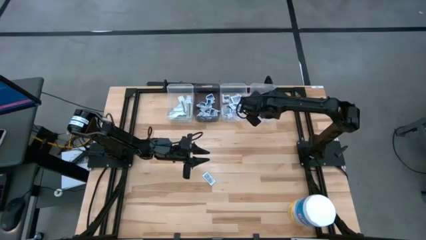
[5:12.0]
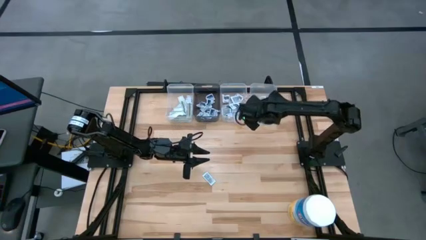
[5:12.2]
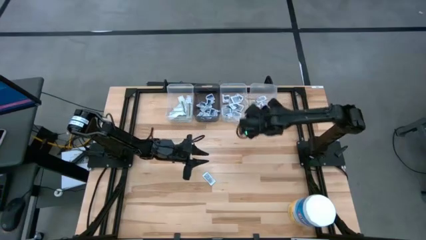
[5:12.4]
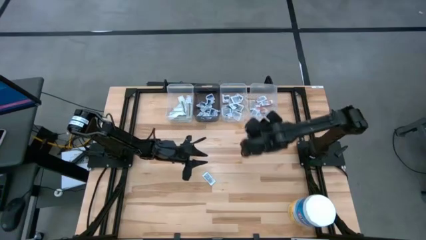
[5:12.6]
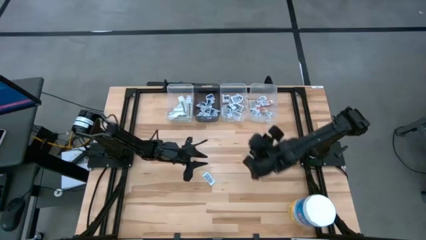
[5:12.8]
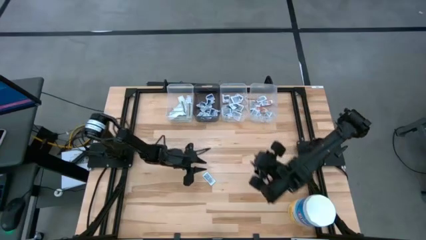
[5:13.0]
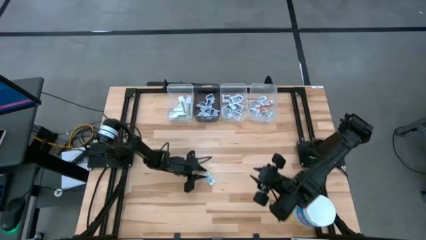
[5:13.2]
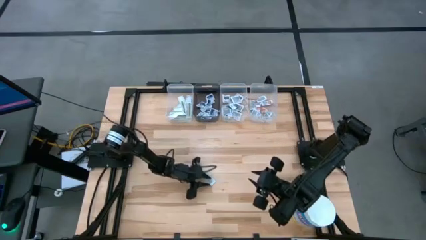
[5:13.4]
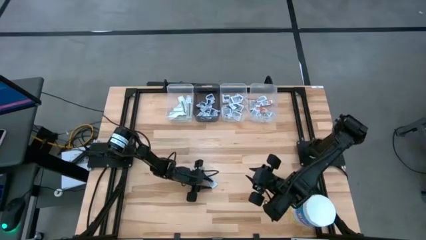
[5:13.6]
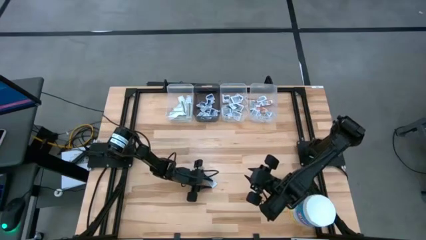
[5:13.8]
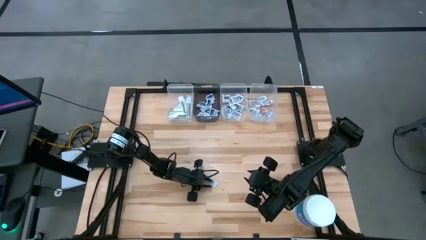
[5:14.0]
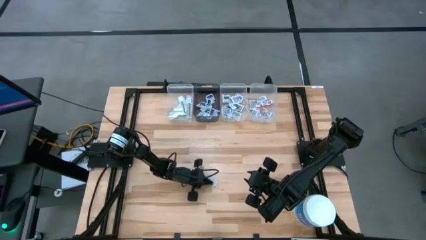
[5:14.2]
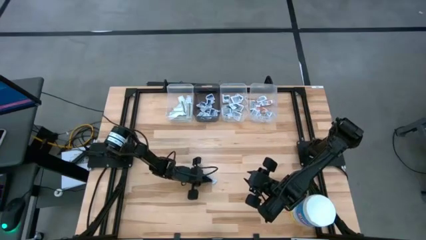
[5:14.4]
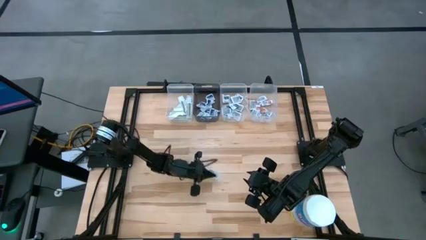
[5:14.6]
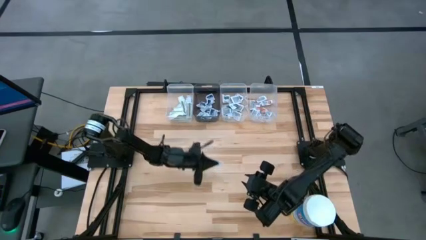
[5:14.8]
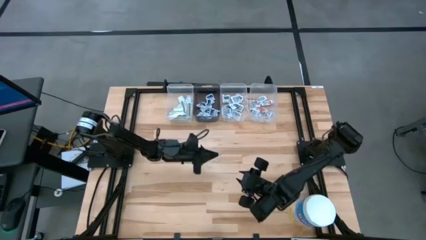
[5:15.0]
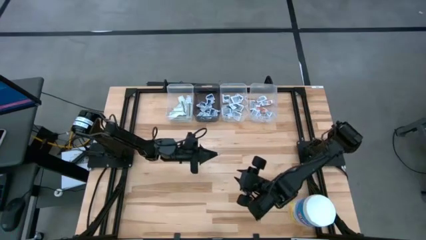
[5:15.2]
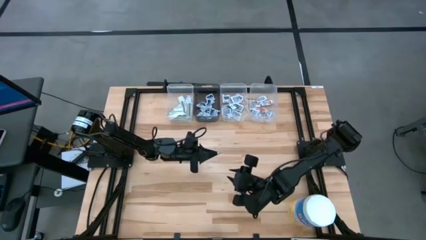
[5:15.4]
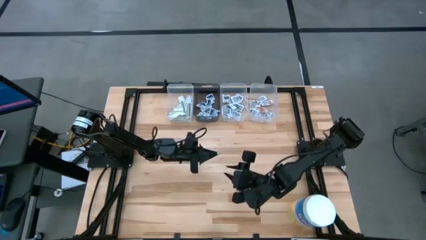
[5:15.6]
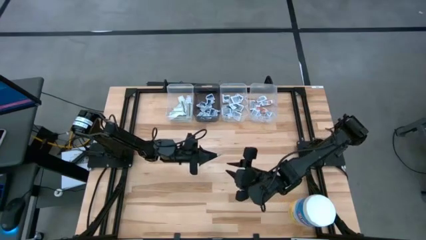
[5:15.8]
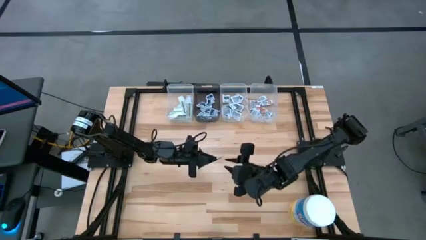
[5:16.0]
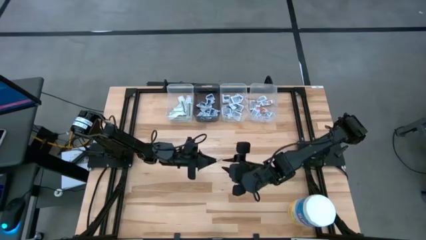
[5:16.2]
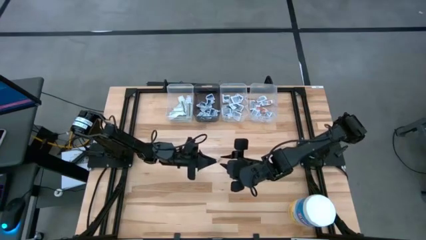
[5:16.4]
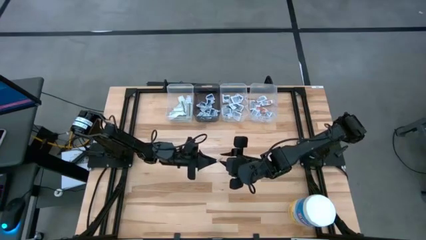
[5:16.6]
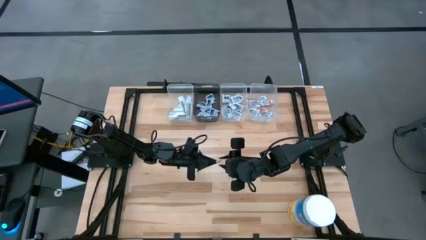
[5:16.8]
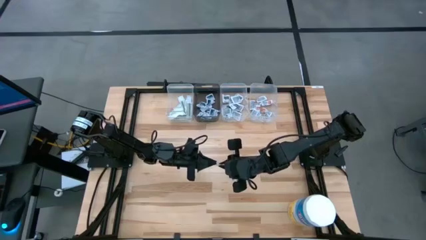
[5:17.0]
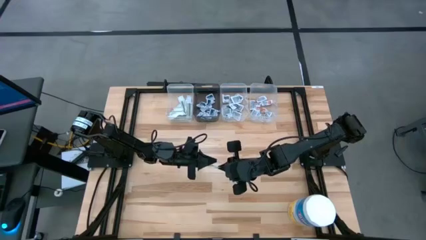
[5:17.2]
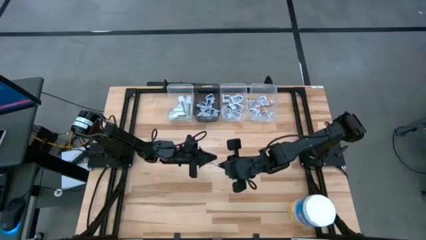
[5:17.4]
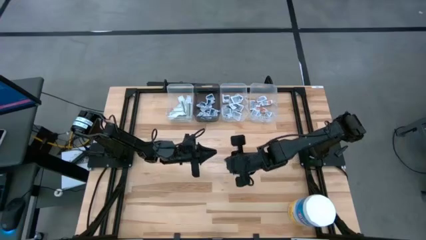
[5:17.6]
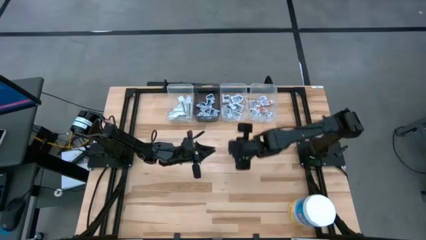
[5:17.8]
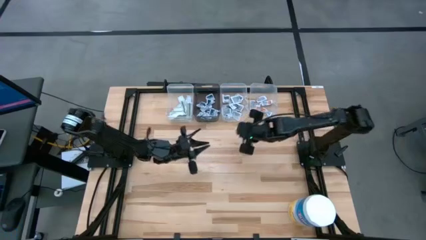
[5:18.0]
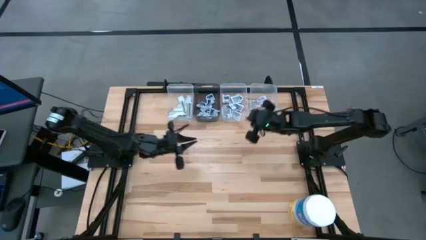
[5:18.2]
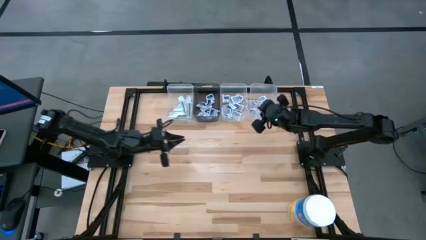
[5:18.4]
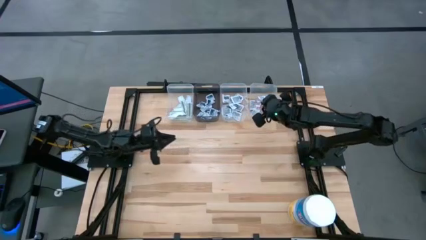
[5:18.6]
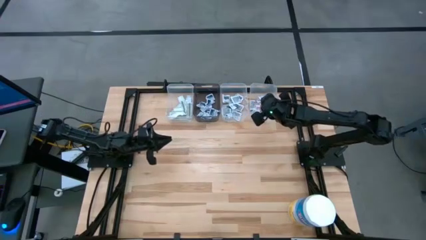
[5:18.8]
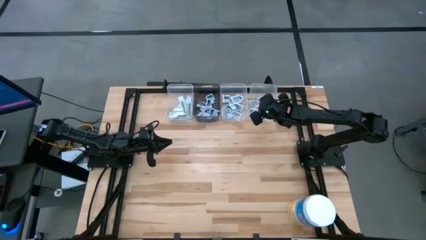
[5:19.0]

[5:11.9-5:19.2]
Task: Pick & Place First Aid Supplies
Put the ointment pack into the right transparent bin

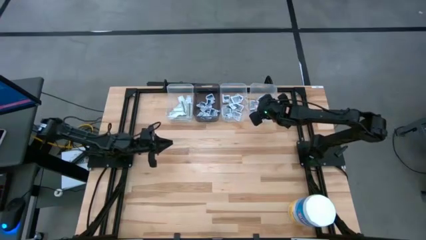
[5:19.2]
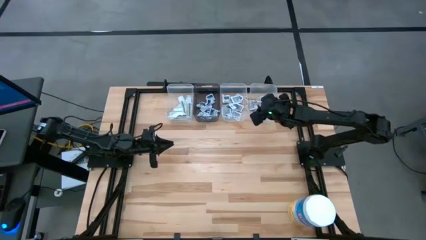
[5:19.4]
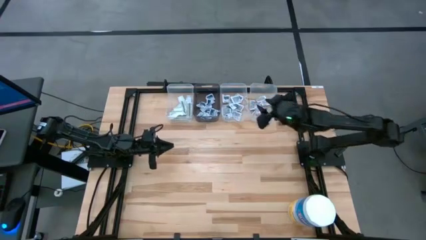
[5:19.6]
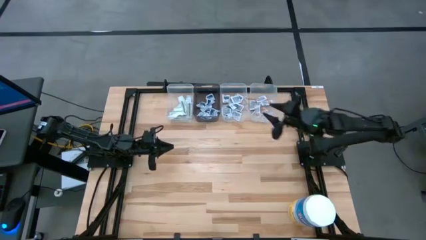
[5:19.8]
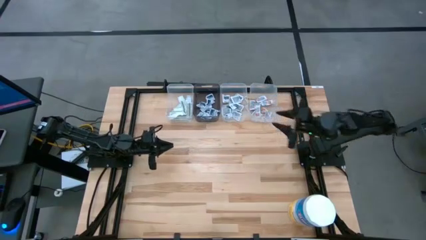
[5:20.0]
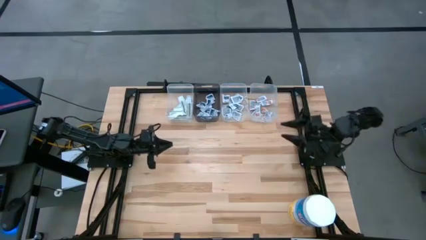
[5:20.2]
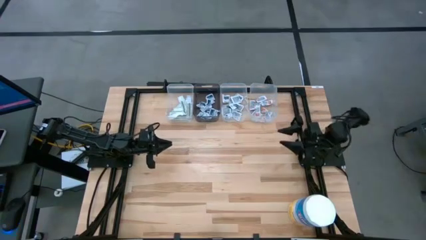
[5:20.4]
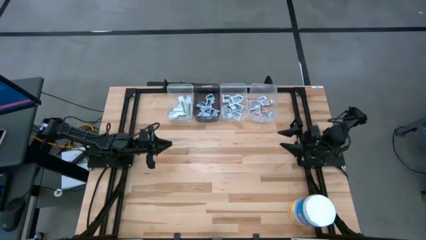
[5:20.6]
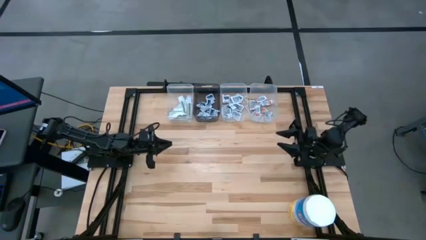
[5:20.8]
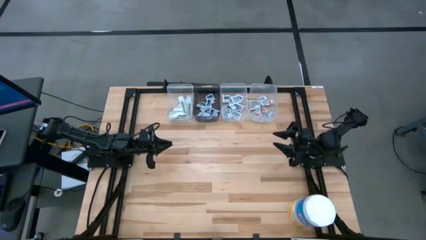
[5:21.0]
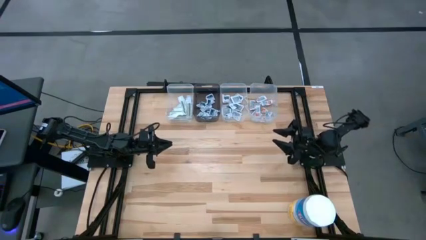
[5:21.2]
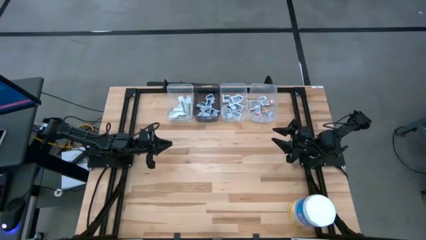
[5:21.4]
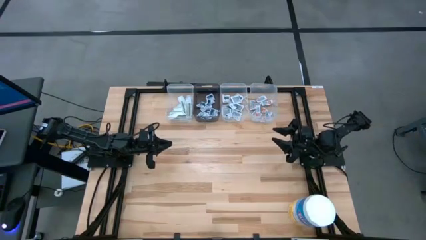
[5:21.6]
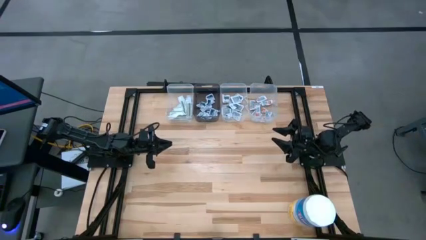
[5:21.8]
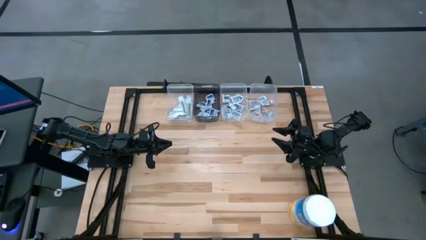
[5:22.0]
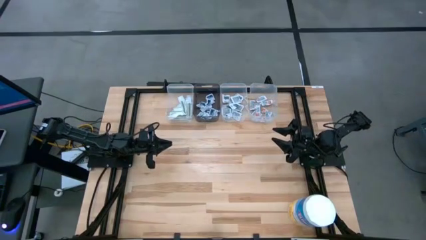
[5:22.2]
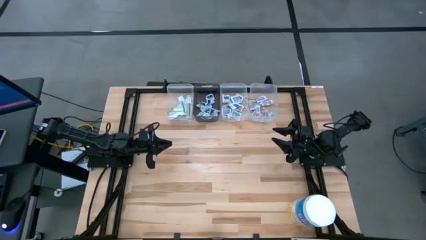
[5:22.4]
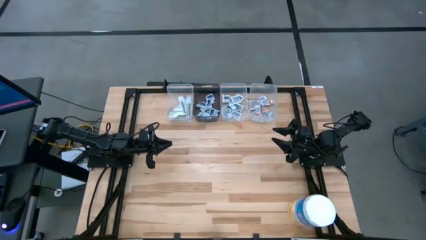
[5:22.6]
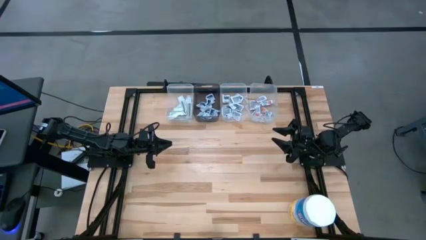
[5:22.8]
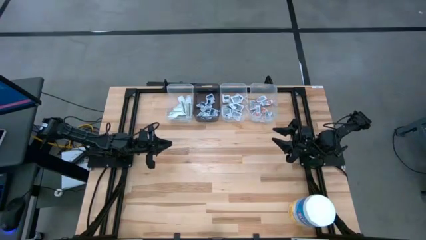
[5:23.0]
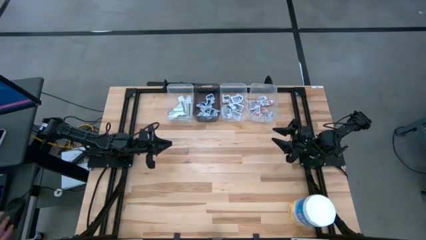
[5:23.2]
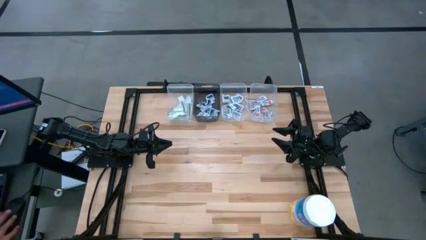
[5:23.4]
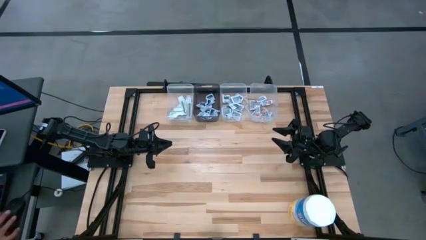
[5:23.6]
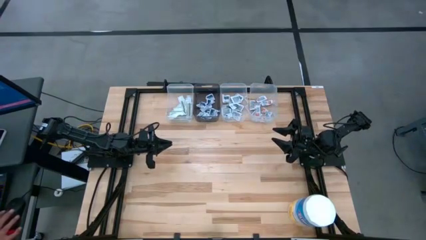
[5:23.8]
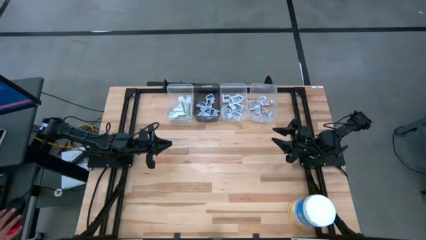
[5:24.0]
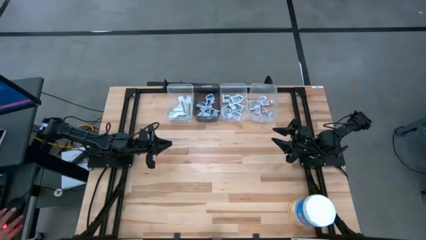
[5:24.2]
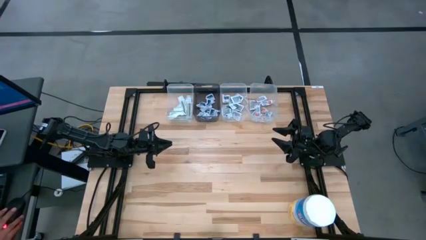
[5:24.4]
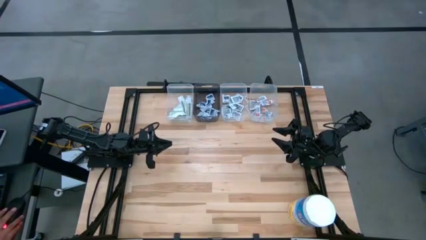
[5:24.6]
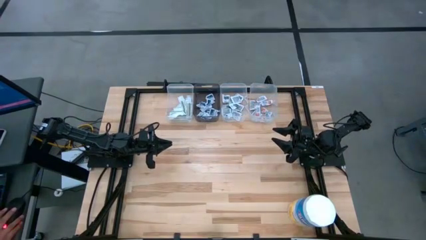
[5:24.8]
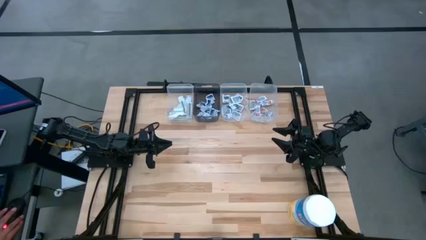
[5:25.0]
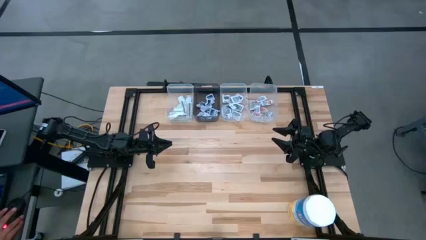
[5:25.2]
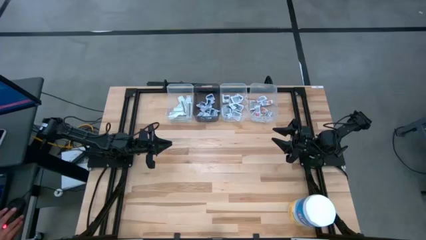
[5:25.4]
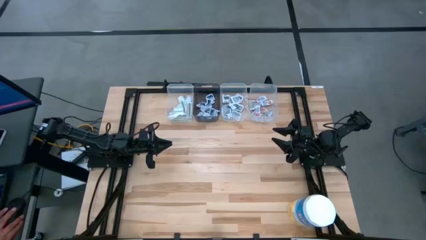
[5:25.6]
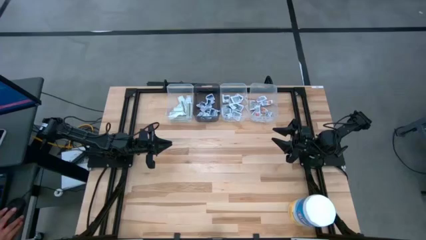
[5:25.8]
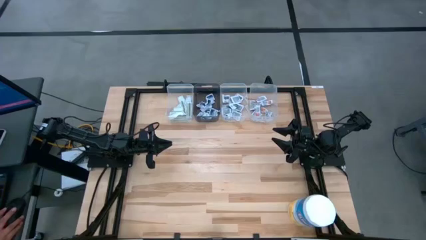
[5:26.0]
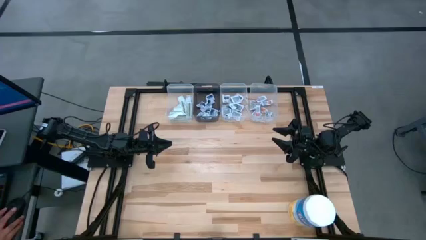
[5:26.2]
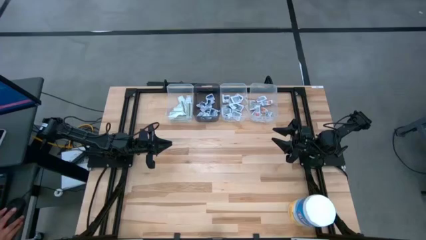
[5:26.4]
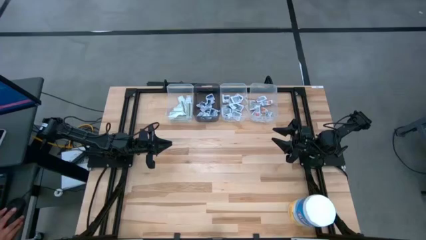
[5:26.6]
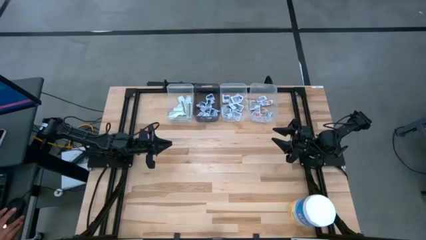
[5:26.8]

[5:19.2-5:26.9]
Return to Home Position

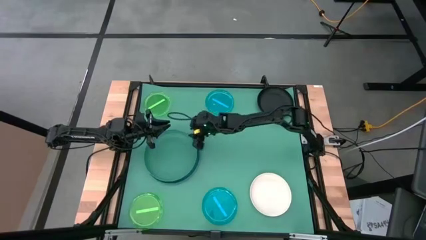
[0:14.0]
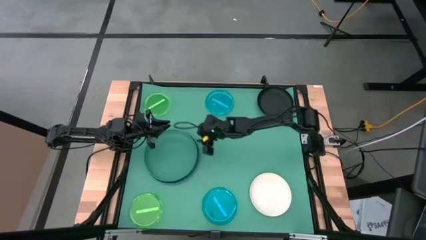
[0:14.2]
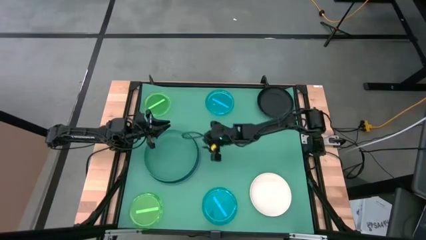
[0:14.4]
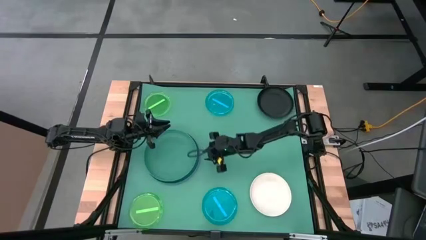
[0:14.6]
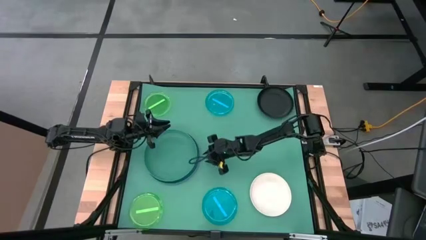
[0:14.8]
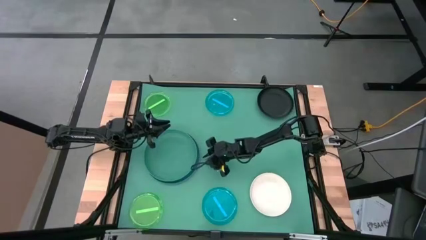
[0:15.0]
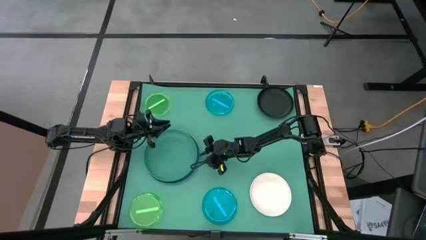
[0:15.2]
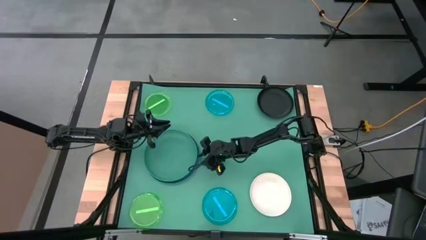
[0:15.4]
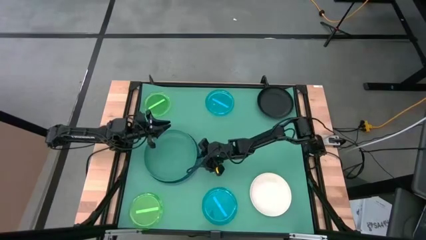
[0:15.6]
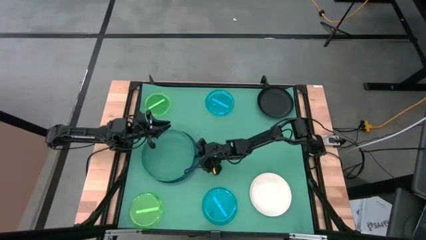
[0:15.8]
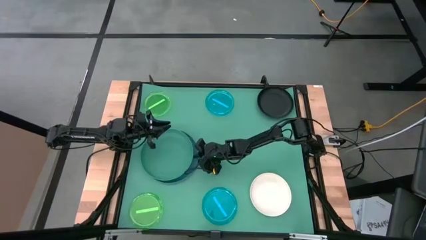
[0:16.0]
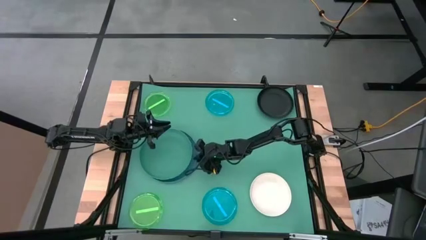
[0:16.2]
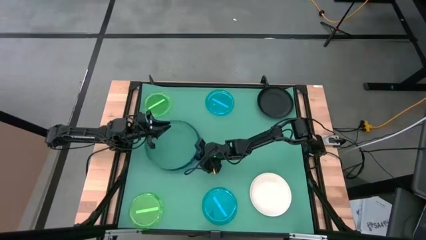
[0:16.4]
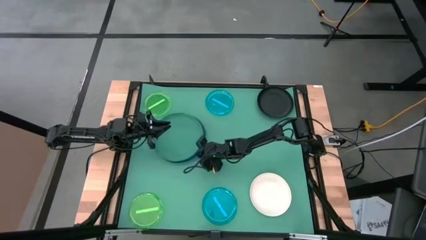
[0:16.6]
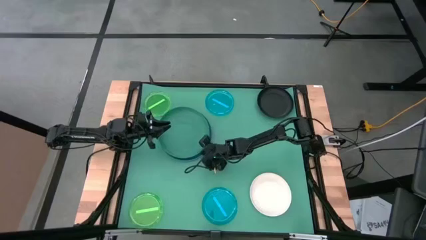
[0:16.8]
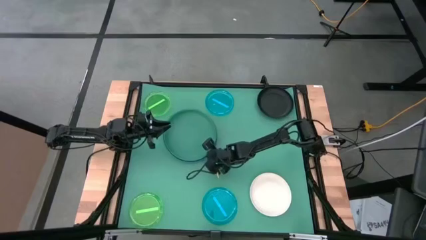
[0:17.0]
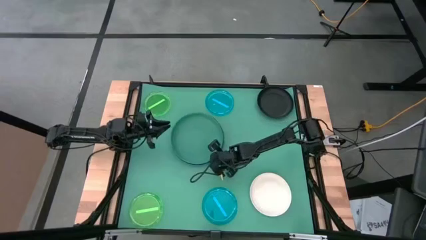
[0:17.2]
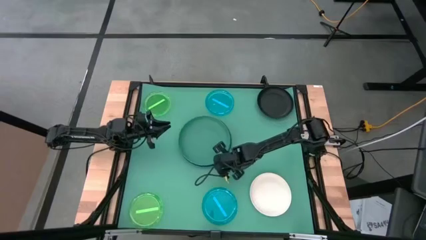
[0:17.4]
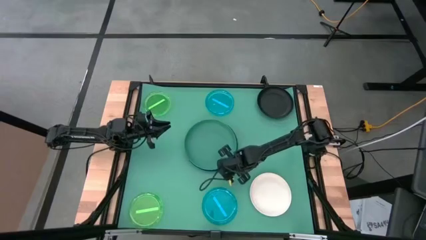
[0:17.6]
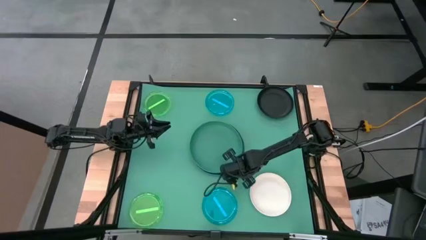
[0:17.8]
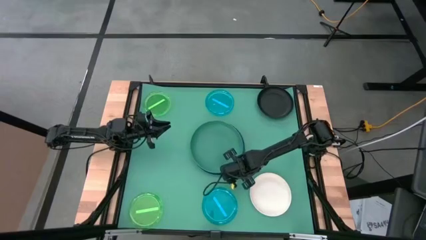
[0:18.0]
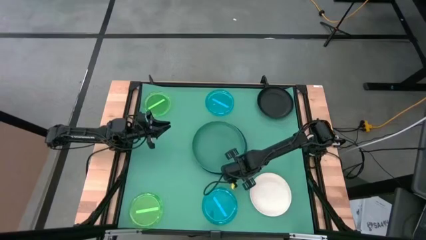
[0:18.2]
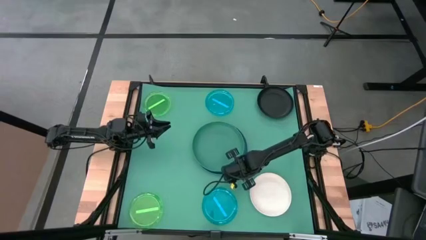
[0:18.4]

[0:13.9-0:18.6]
Task: Stack plastic plates
Move the stacked plates to the center of the table
